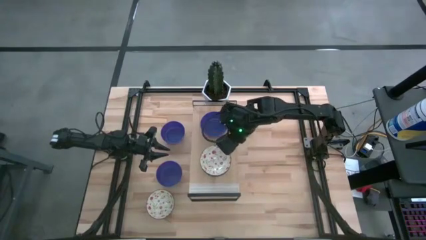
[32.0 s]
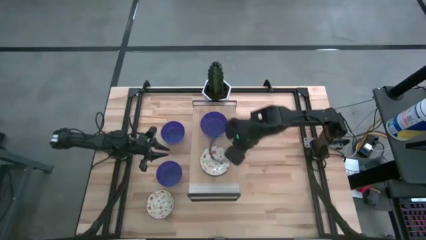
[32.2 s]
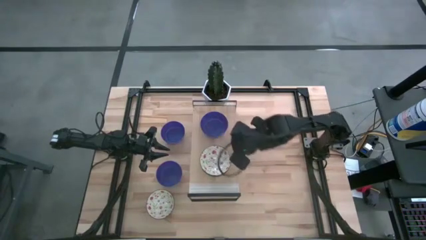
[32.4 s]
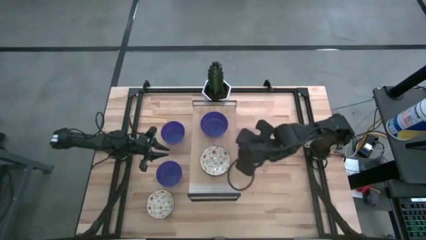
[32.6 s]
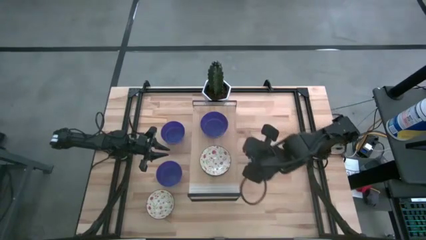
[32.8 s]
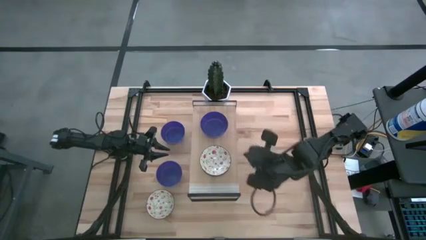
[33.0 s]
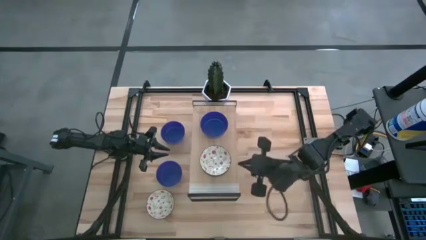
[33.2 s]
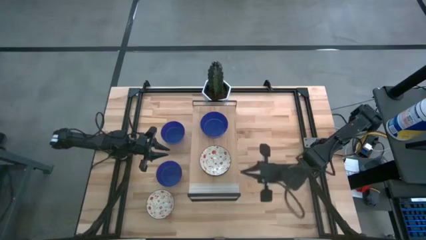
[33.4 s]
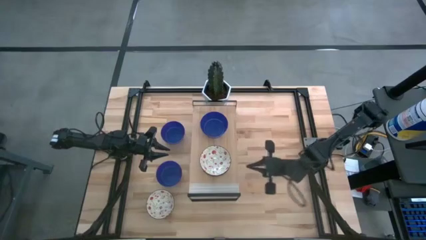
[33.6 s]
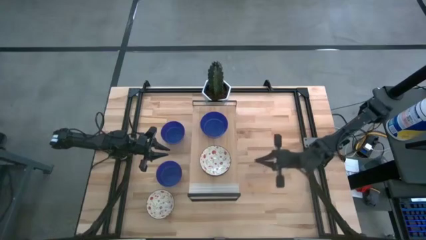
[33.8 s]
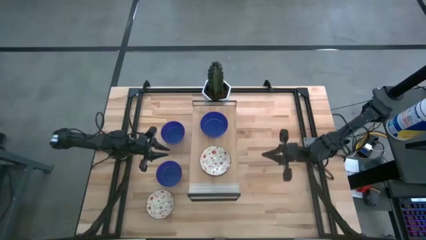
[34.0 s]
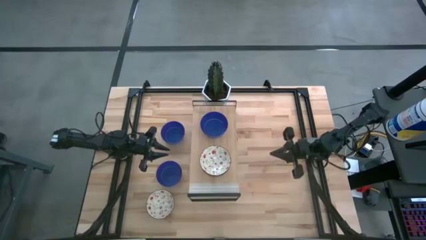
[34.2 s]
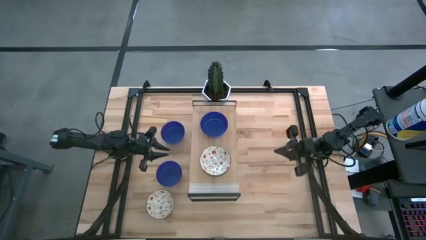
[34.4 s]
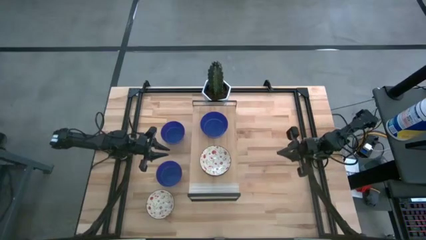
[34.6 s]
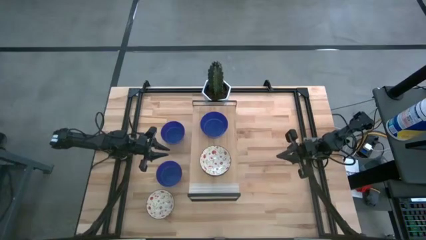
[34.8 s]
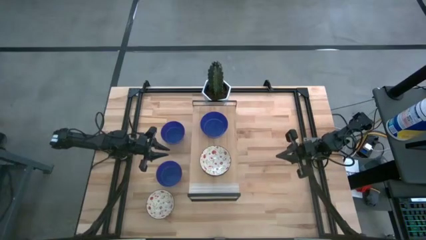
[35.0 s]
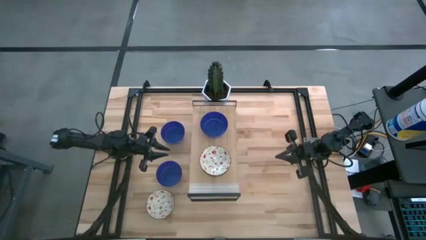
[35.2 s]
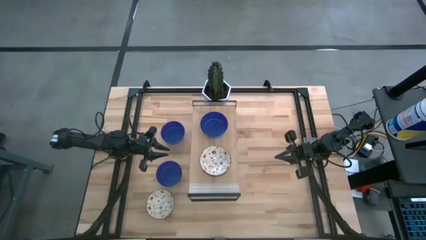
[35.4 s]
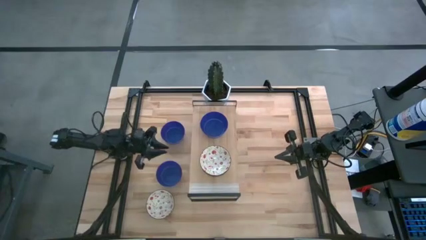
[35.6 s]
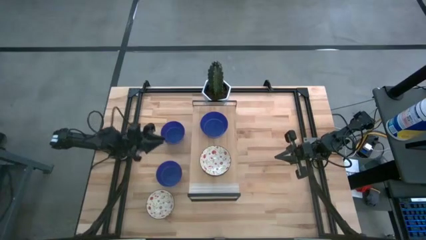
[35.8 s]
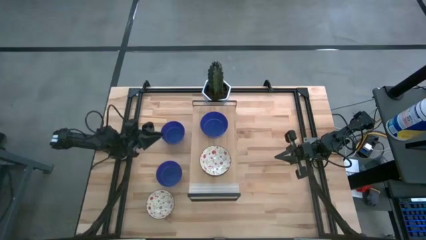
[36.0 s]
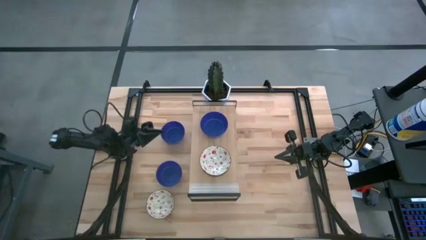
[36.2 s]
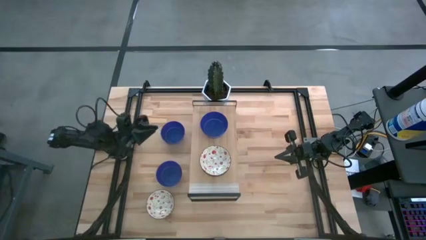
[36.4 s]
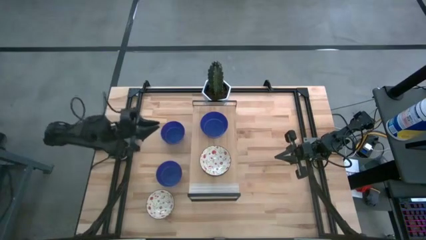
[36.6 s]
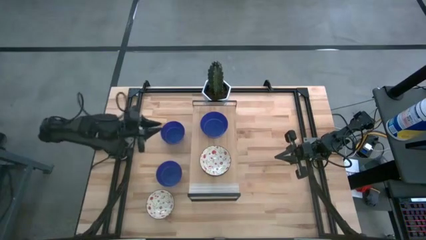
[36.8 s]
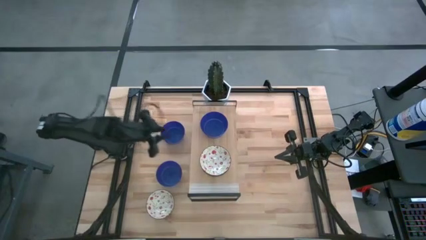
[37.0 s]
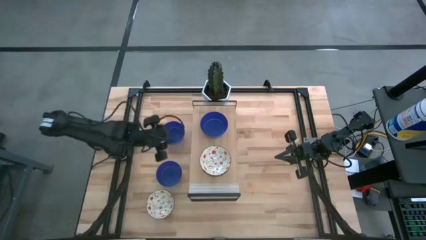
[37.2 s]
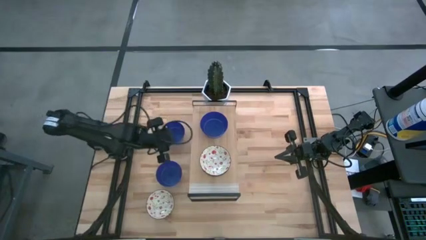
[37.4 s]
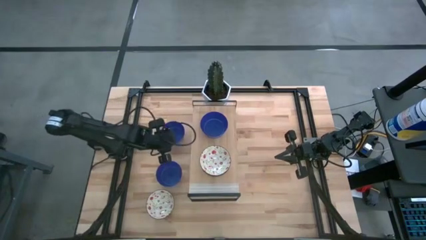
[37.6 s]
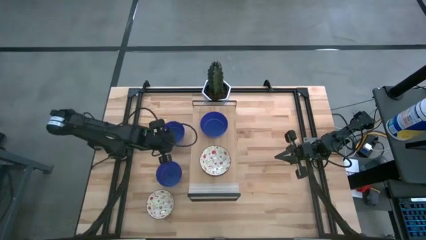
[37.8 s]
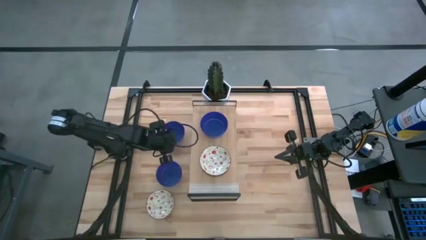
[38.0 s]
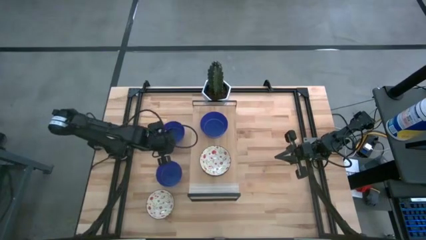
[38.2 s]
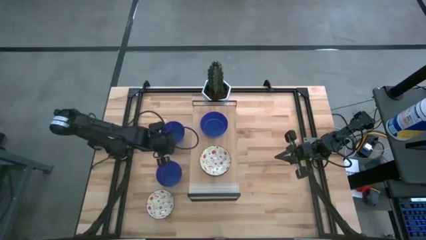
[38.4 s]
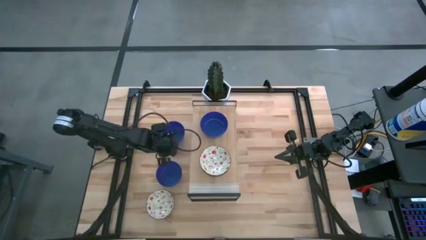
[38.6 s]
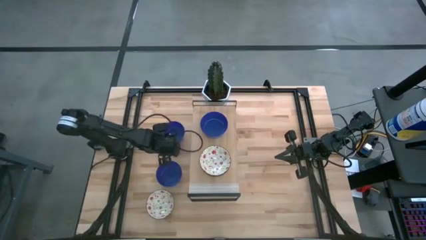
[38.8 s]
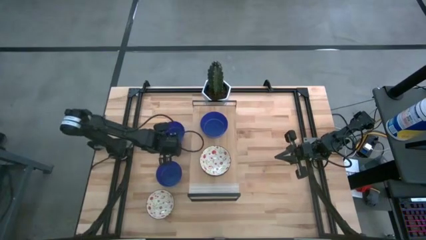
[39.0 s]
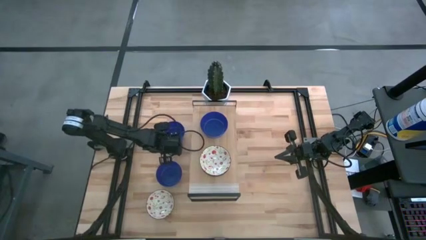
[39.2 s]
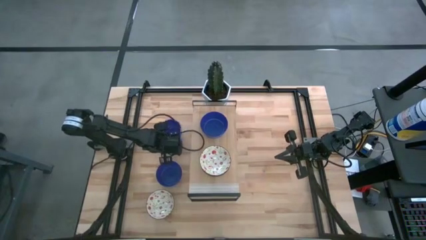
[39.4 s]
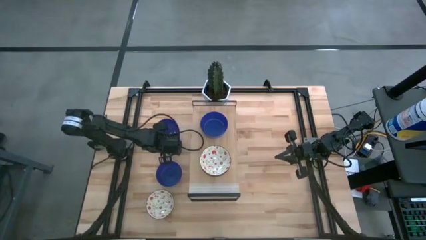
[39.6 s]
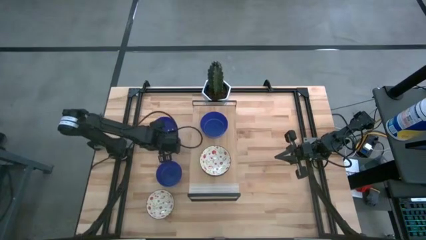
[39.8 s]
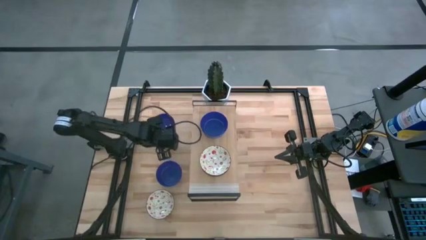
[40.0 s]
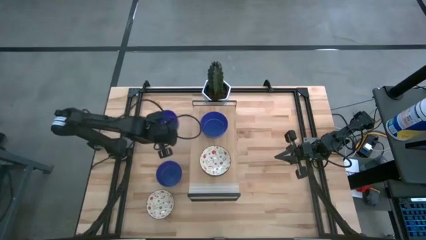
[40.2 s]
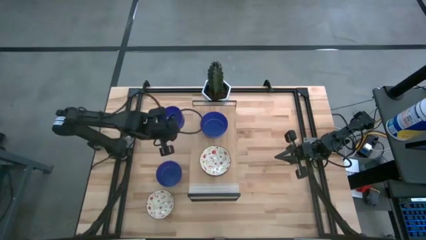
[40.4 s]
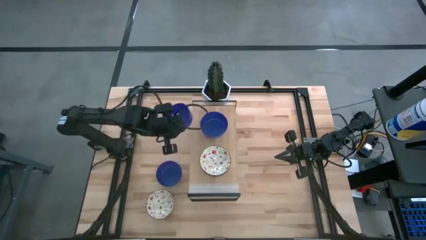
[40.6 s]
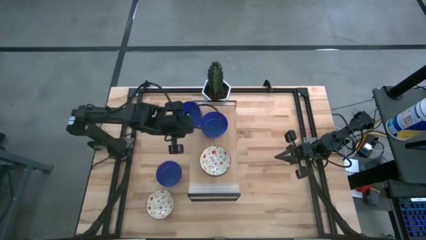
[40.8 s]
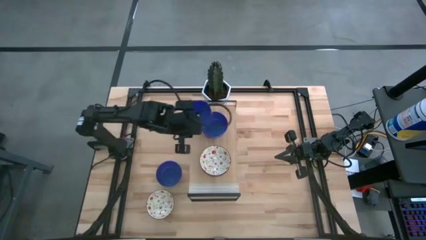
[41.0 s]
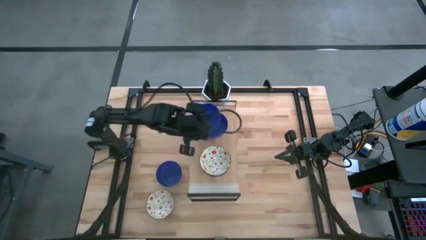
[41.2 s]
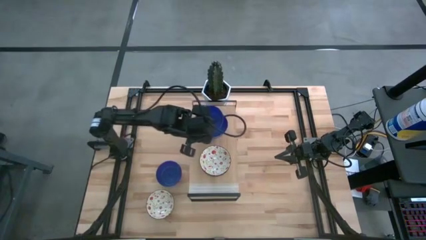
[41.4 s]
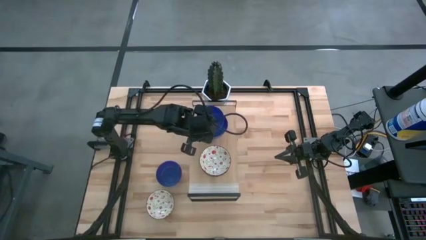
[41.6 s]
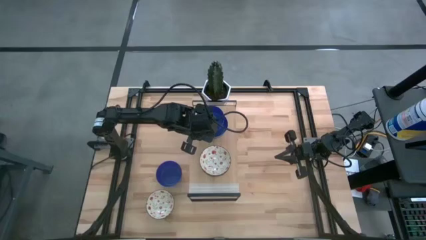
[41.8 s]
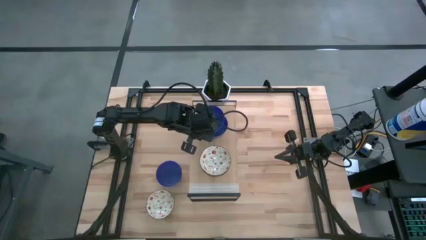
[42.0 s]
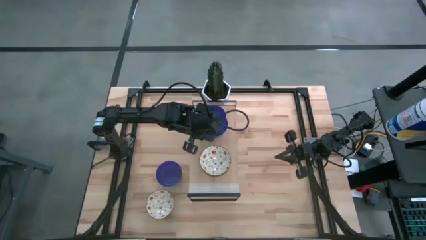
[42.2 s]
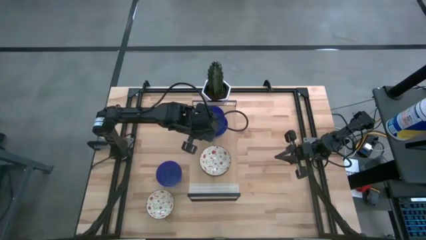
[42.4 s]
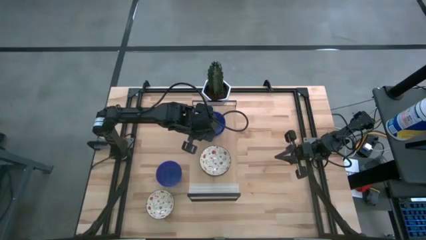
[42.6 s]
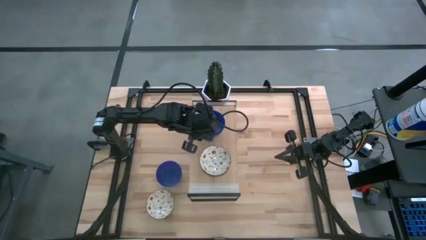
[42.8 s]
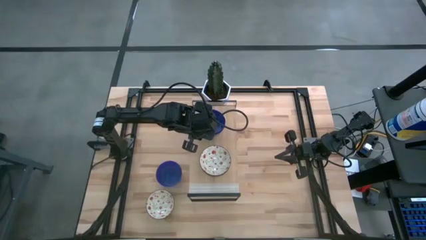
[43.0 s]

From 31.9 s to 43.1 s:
Task: Pick & Place Mini bowls
Stack the top blue bowl on top of the blue bowl on the shelf

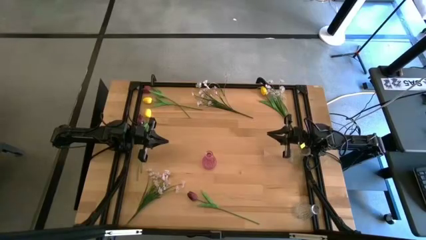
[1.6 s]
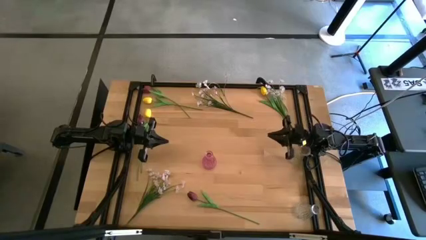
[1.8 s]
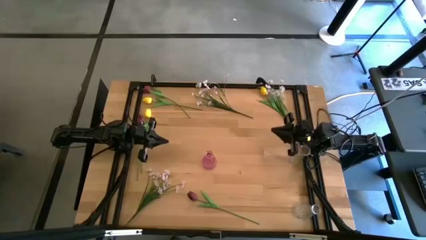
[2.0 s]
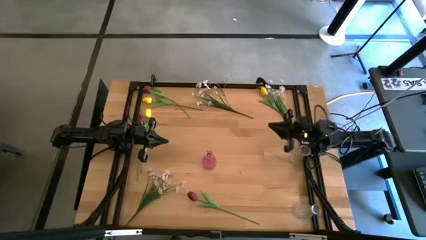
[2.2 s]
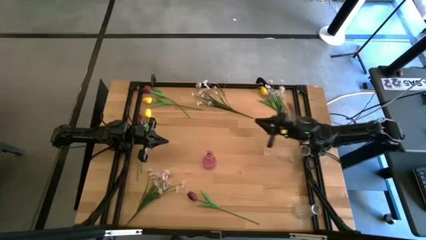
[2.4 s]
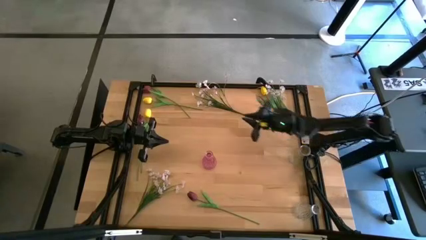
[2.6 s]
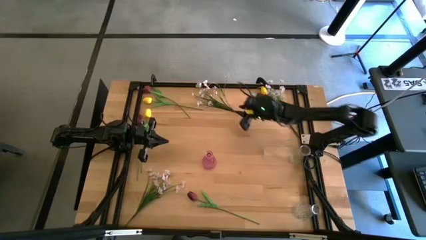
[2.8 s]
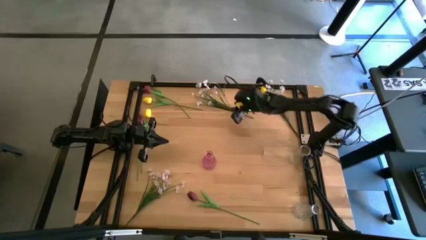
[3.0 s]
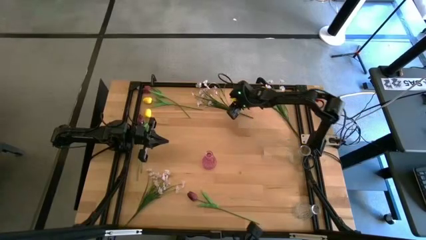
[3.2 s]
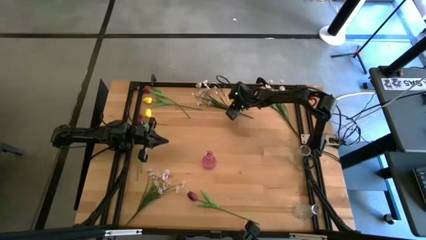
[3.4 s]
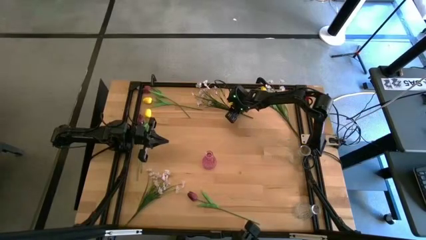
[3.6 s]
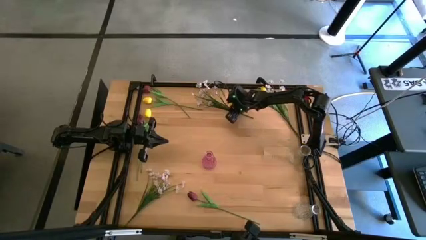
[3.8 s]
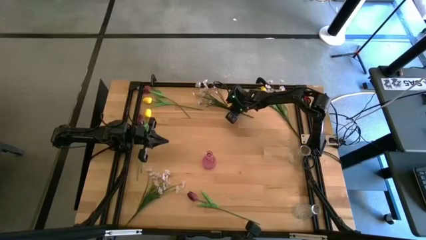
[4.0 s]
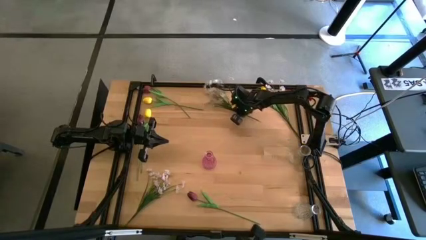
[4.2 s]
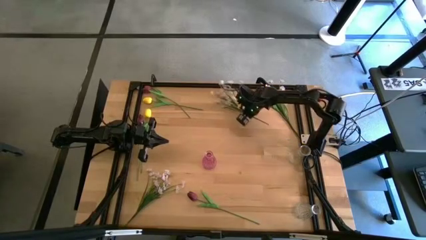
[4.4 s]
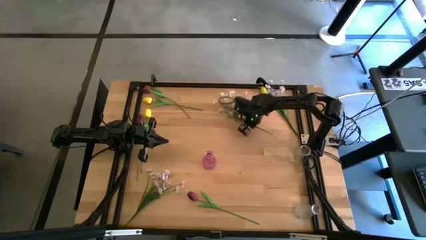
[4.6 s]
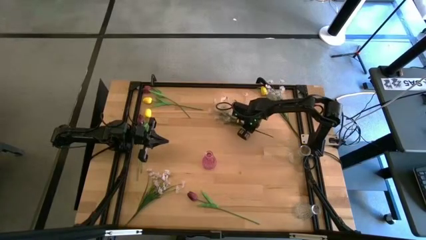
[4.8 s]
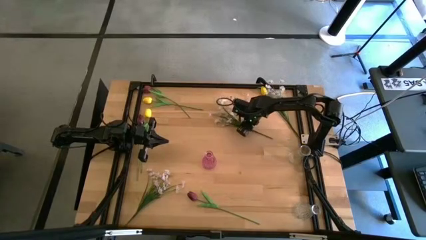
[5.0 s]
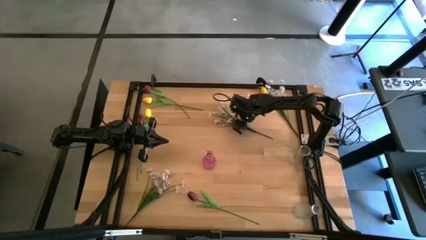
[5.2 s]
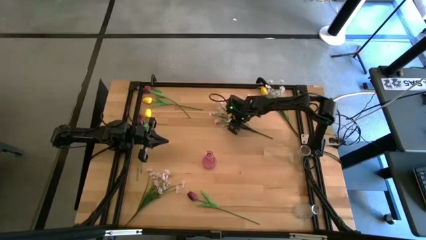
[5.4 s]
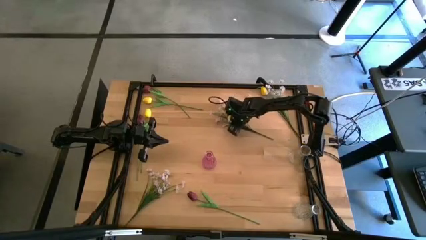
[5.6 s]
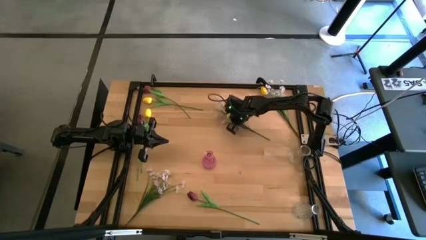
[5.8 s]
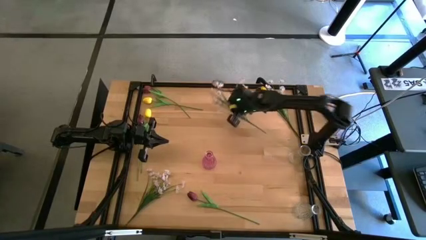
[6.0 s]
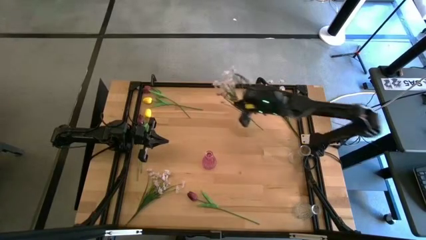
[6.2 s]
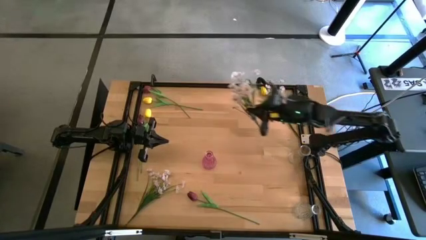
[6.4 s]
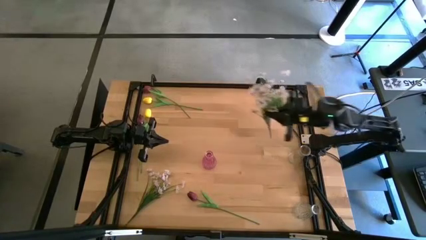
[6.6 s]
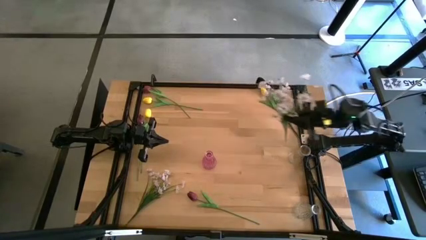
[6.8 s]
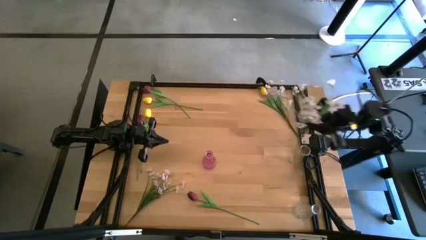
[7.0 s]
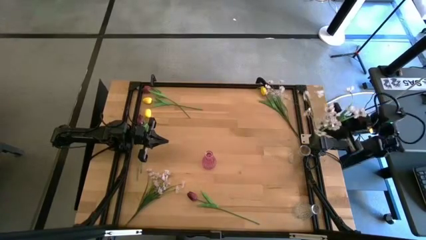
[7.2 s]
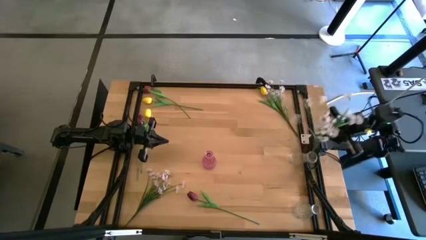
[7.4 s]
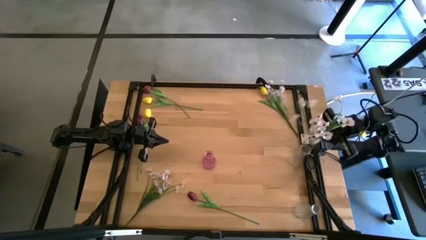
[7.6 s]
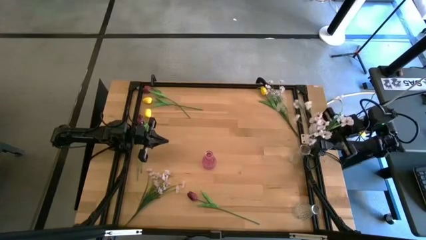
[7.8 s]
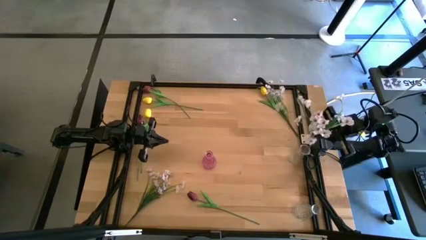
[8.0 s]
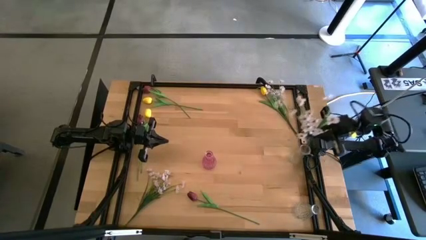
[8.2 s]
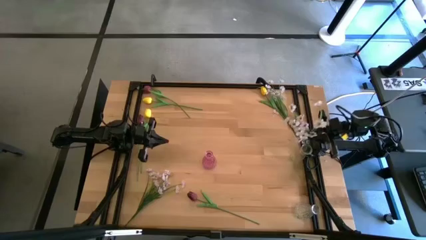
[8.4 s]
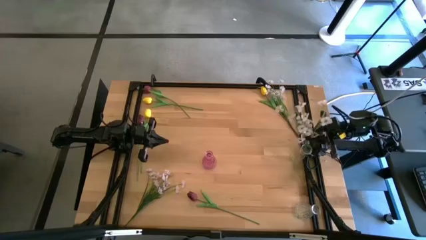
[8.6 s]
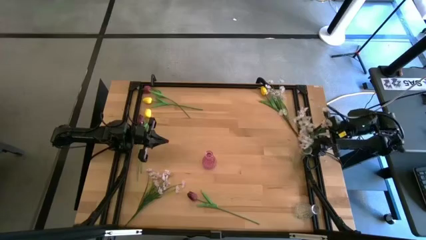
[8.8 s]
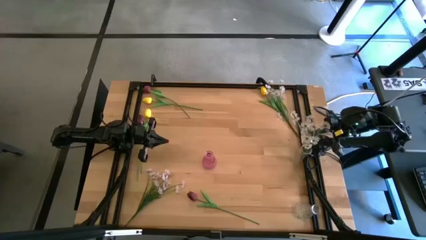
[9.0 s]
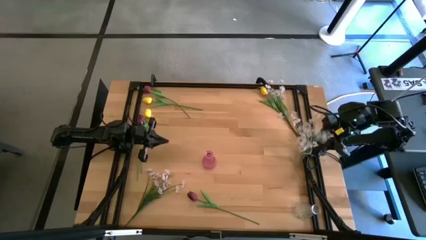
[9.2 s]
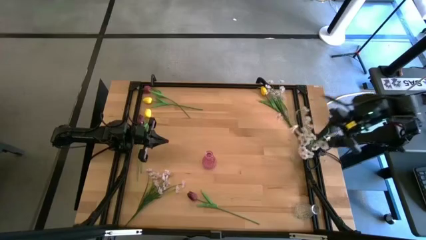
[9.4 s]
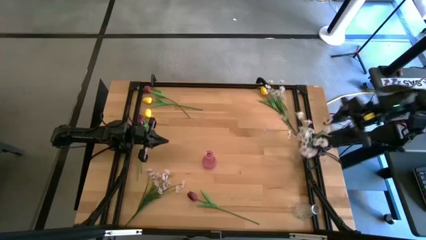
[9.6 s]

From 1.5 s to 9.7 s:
Task: Sort flowers into vase by color
Put the top left white flowers into the top transparent vase
